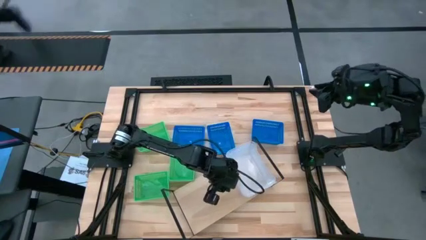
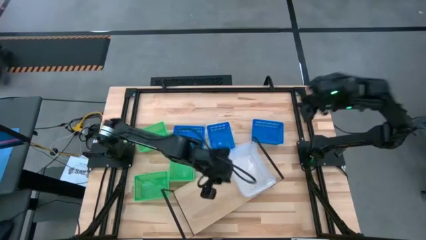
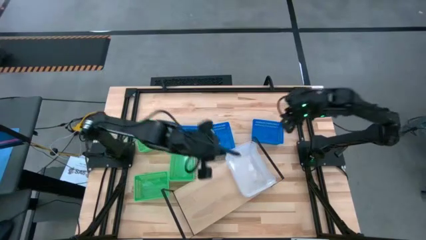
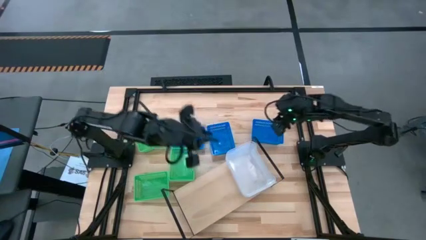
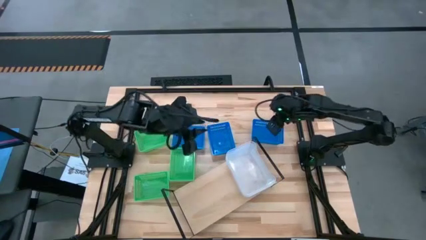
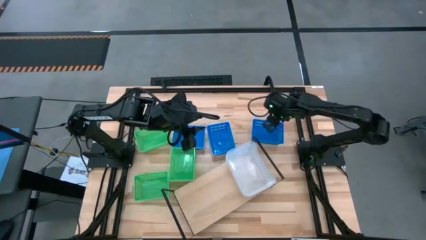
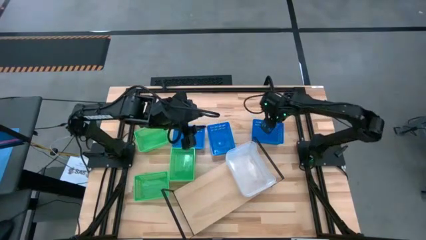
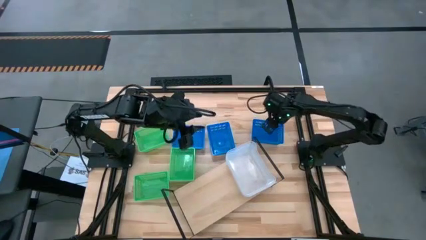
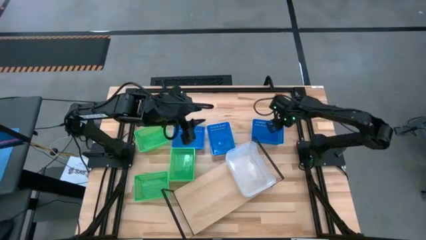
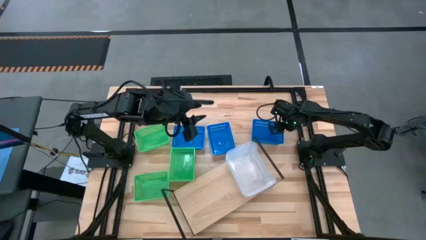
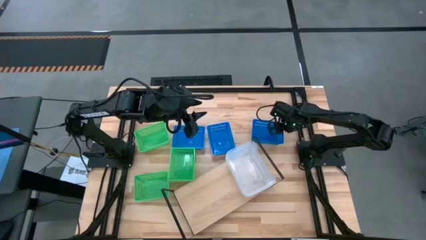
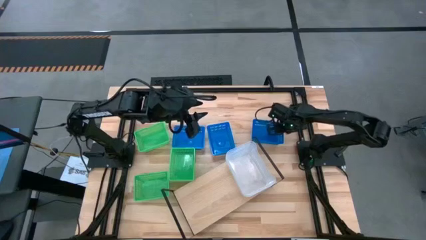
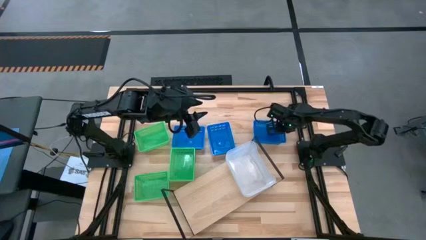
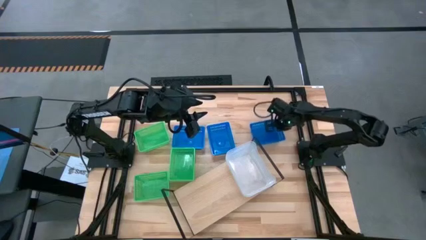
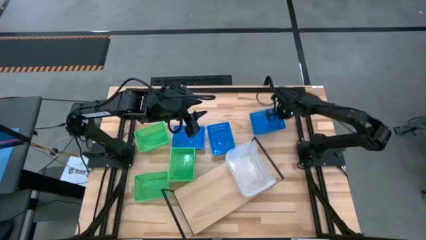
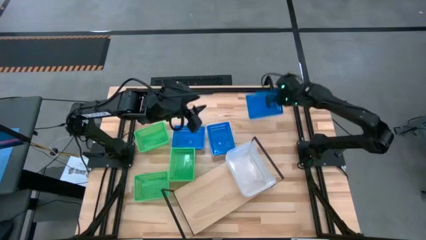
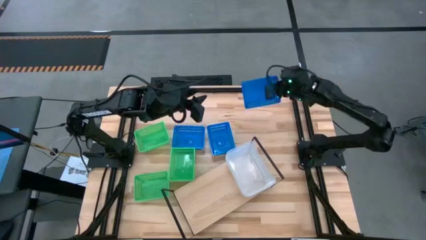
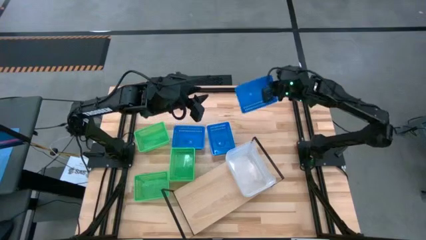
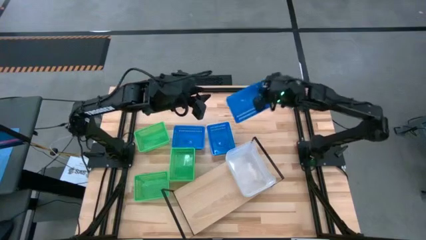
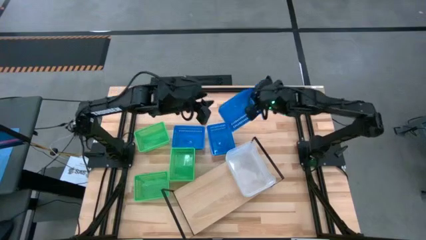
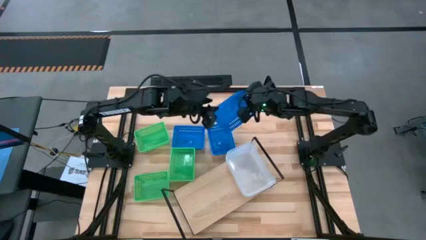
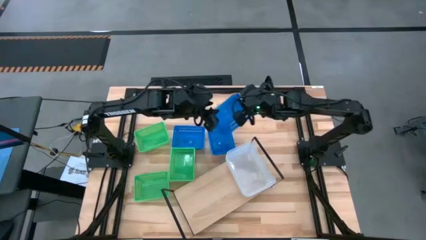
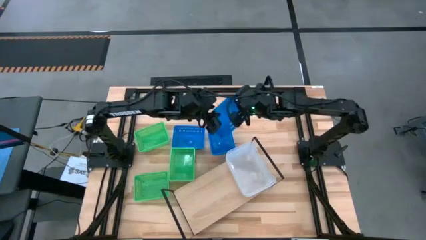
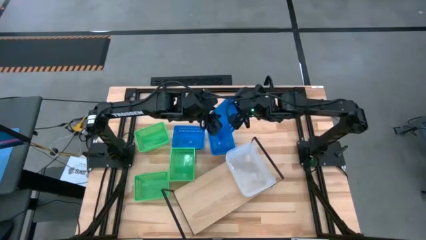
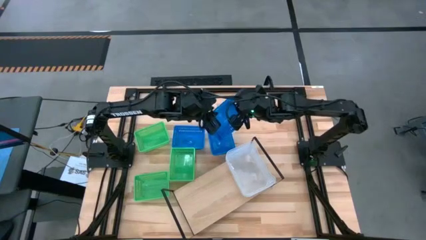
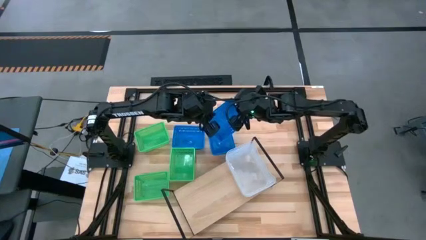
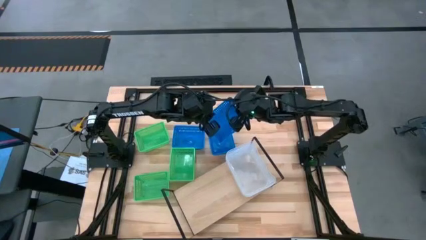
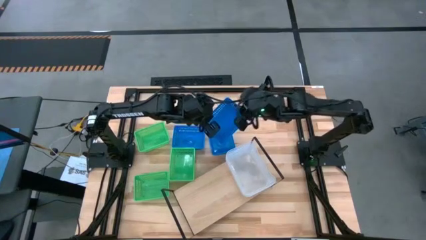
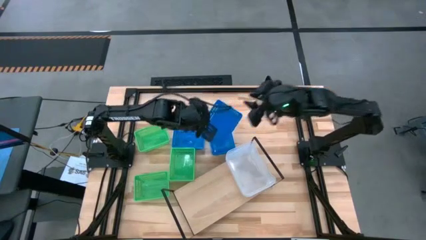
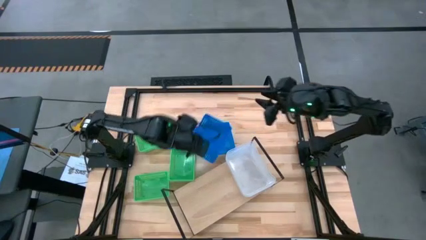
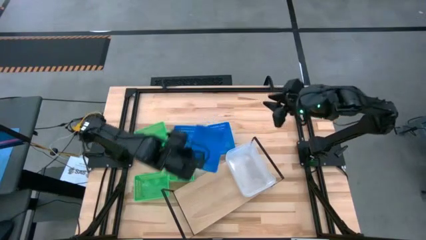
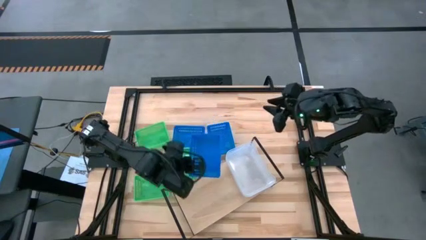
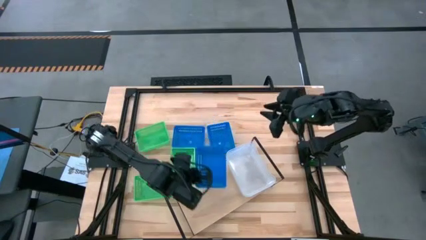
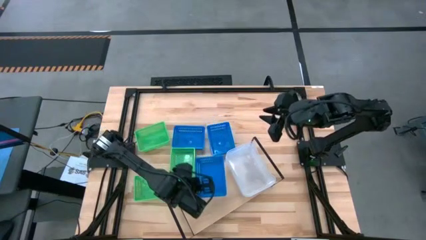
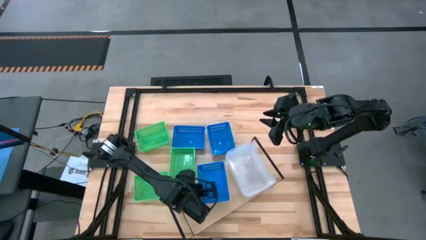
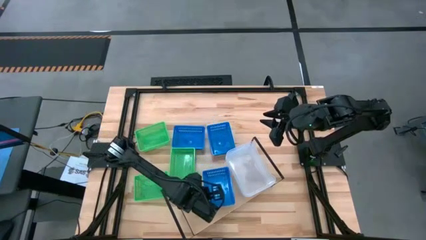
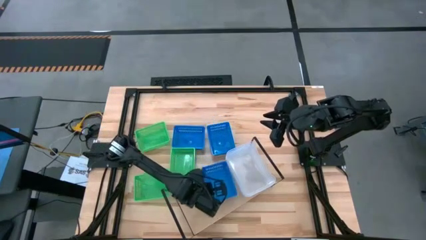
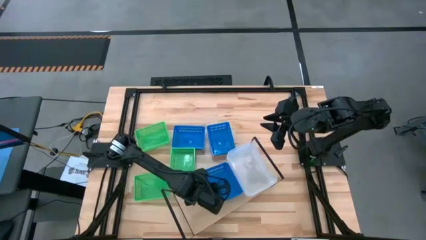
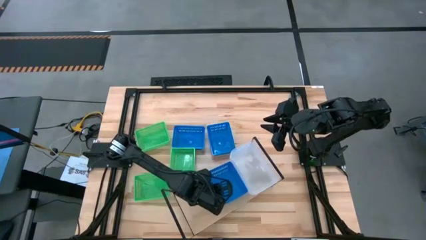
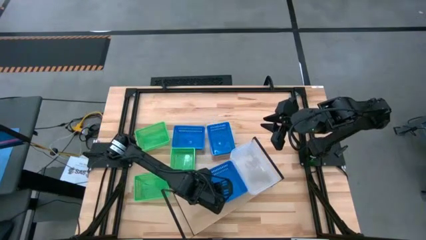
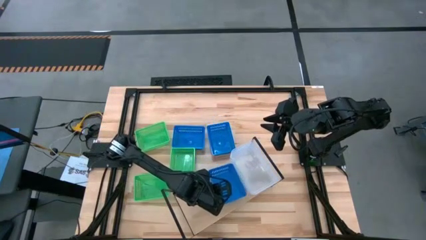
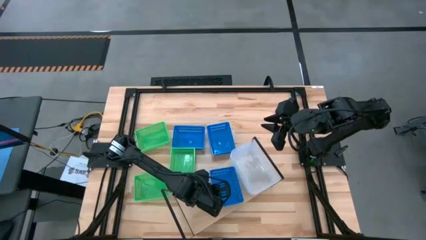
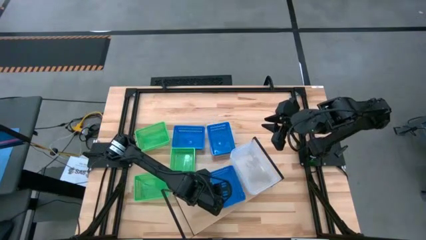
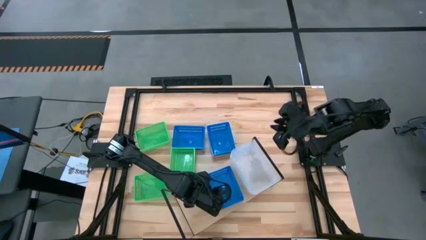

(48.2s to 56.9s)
Task: Stack baskets on shelf by color
Put the right blue basket on the shelf

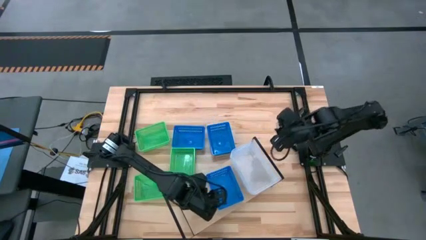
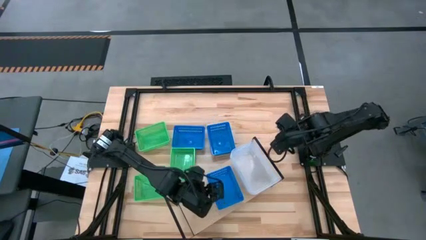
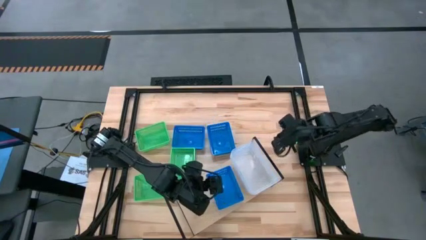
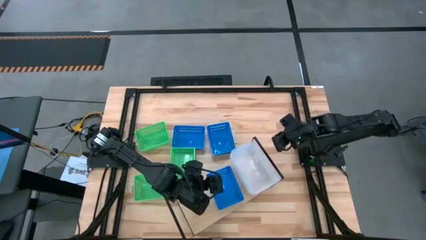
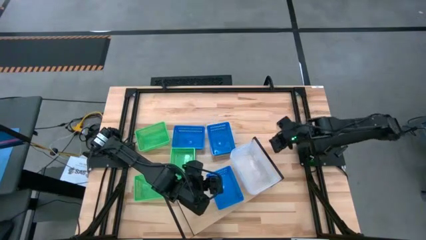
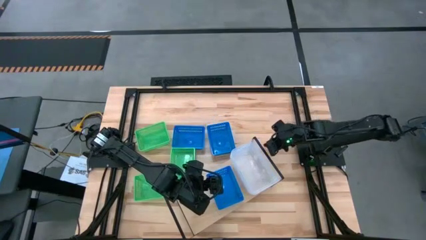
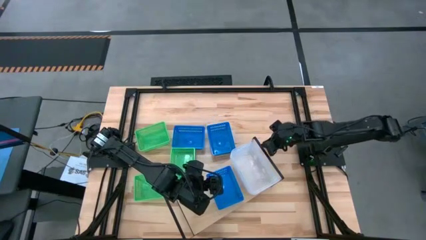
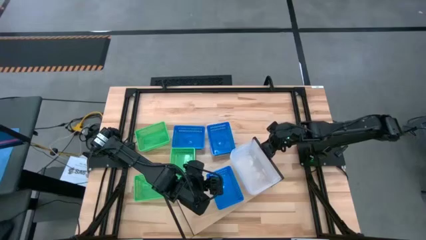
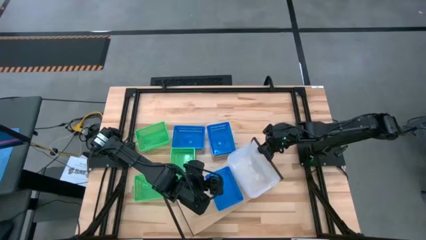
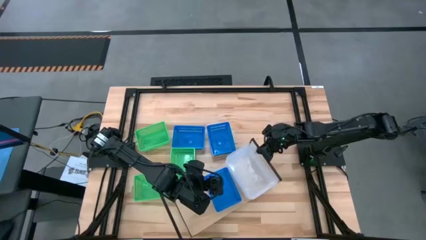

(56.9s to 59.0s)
Adjust the shelf

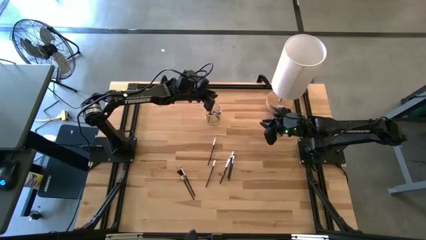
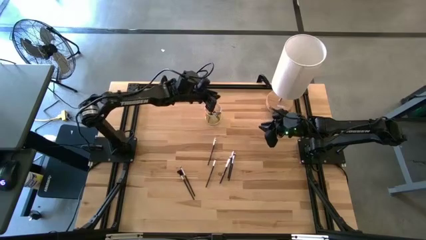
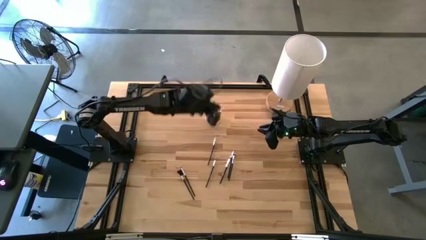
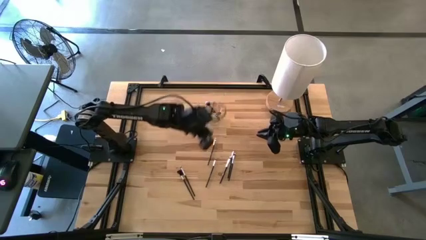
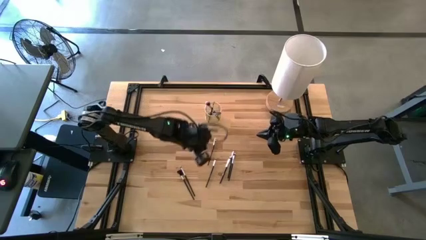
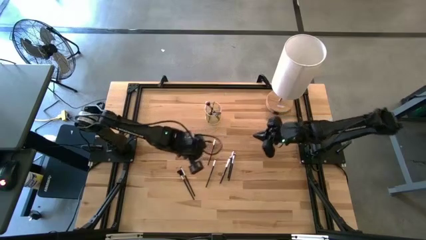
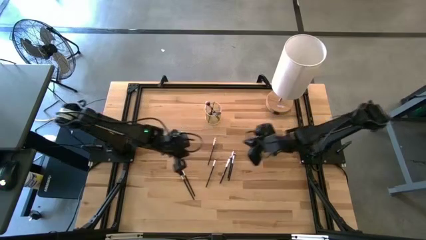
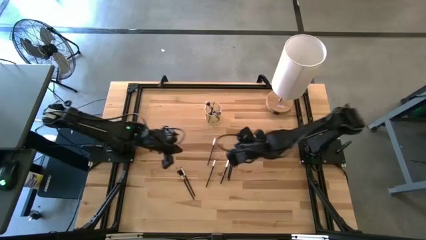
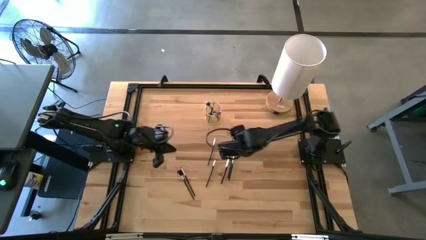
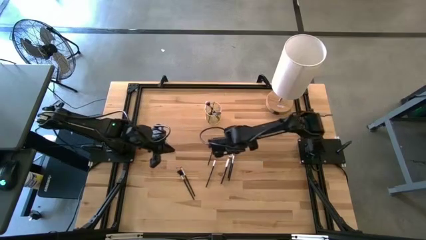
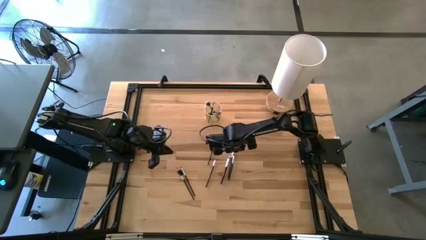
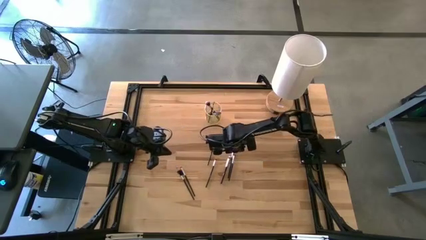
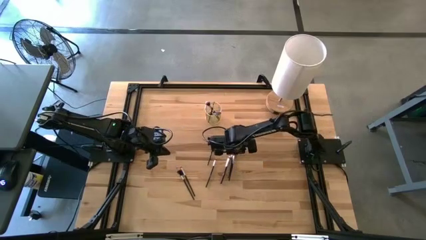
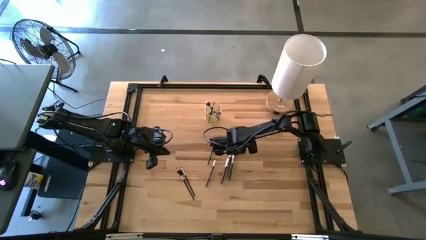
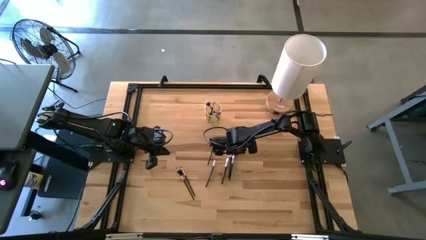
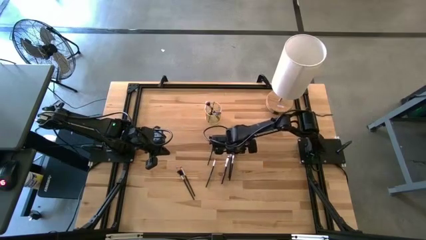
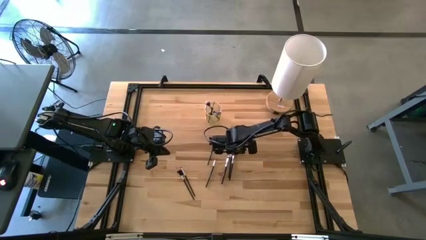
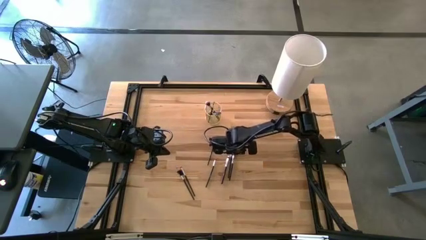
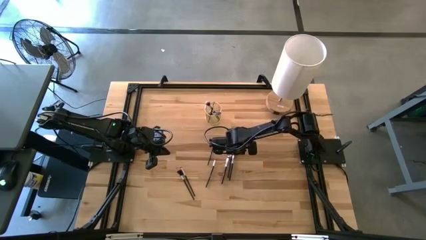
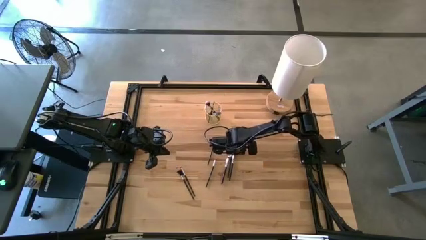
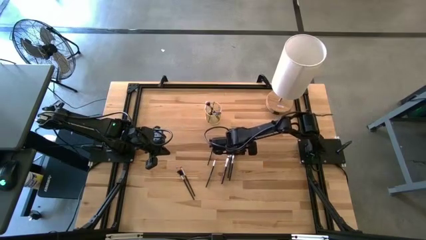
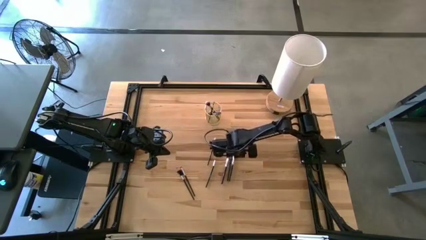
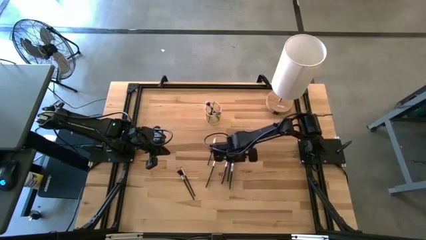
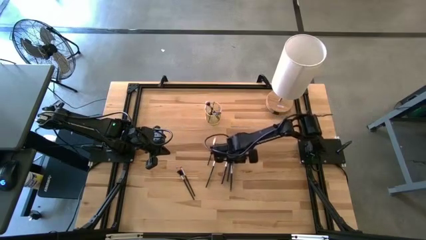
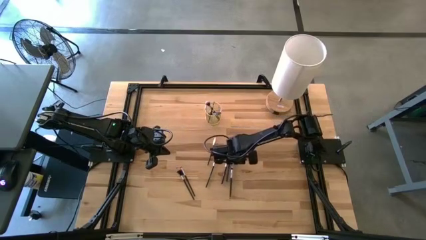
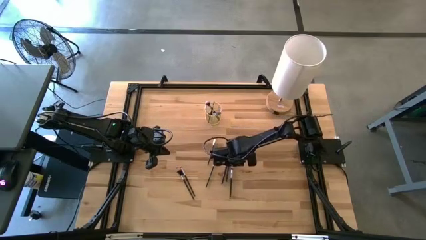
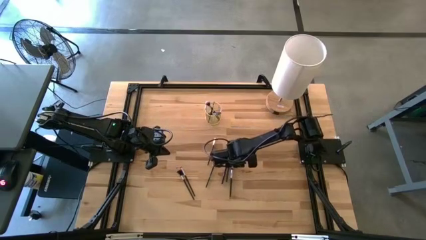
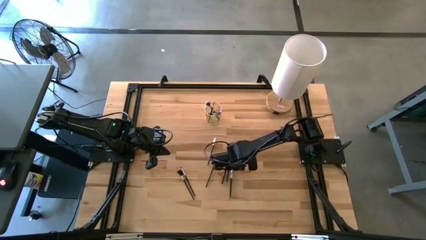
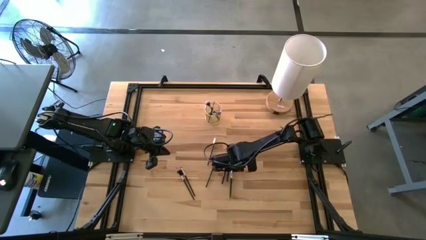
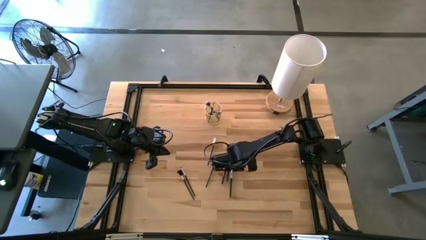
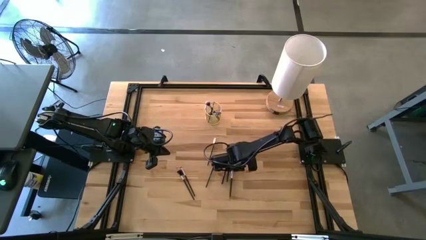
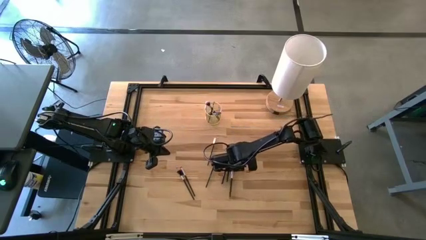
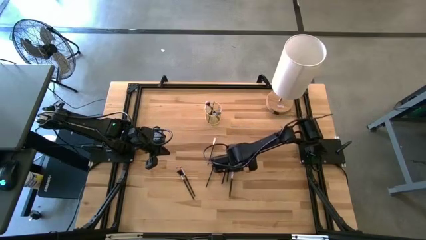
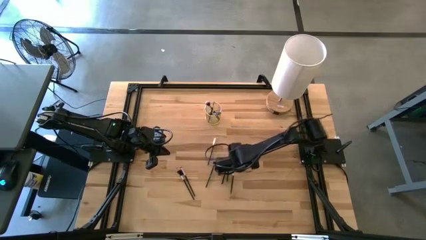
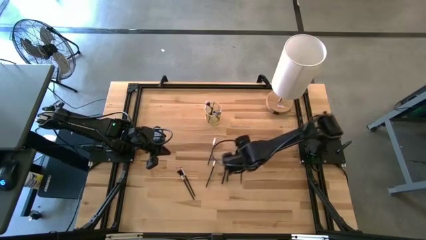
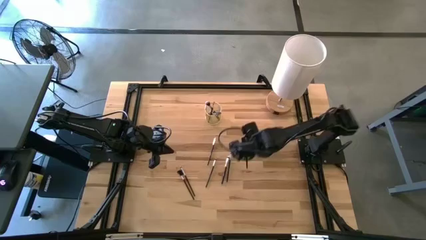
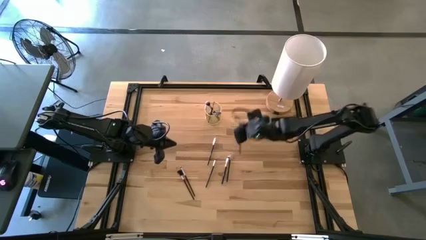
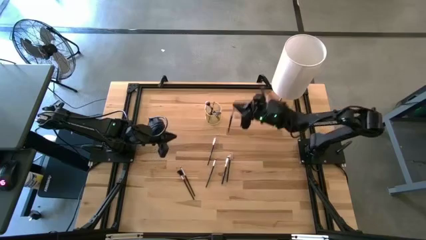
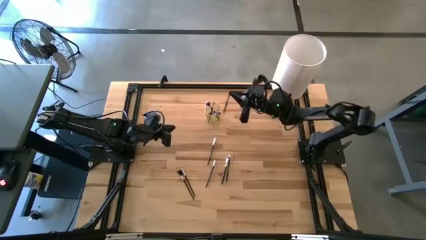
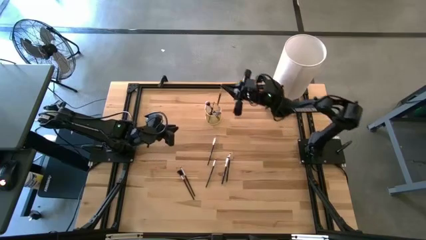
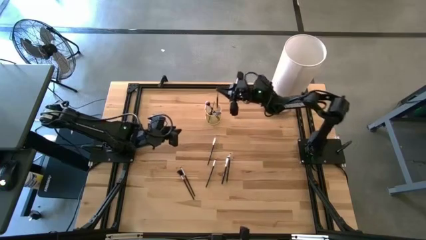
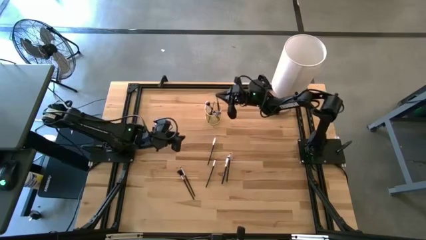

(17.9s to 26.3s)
Task: Put items in baskets/containers
Put the foundation brush into the pen holder
